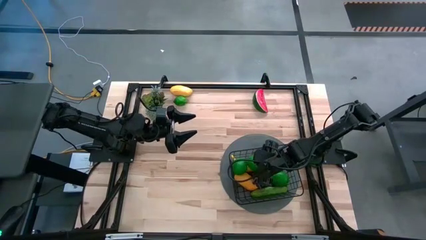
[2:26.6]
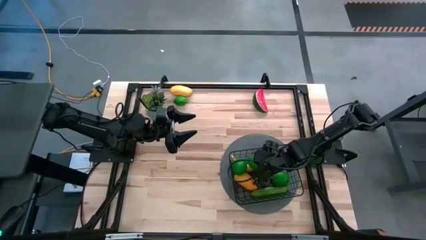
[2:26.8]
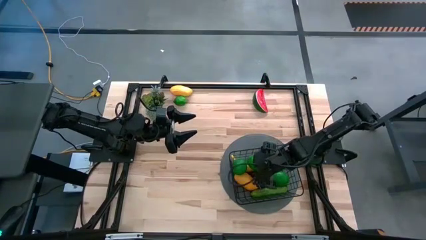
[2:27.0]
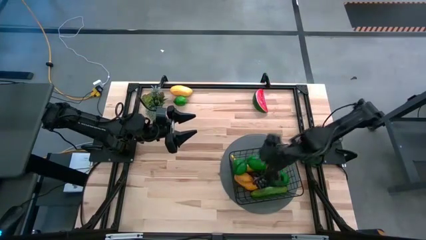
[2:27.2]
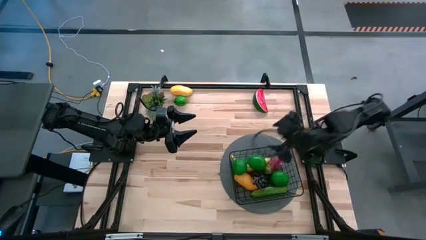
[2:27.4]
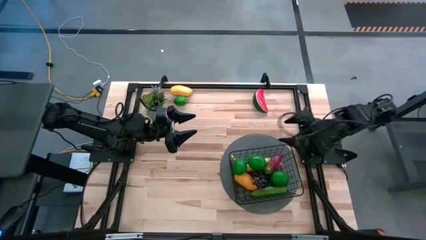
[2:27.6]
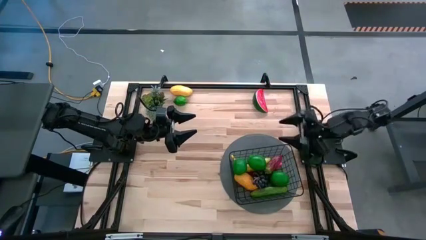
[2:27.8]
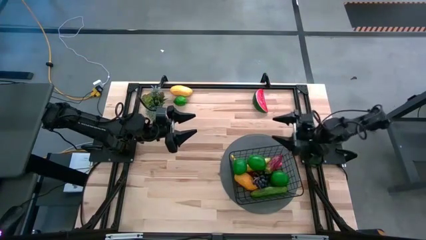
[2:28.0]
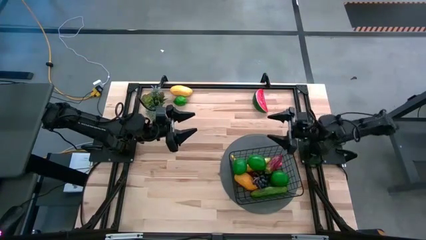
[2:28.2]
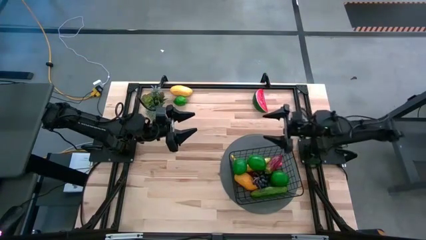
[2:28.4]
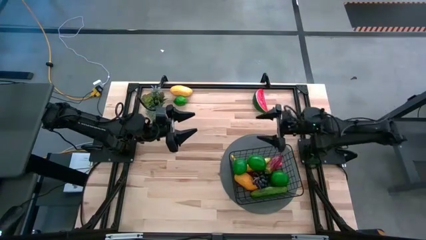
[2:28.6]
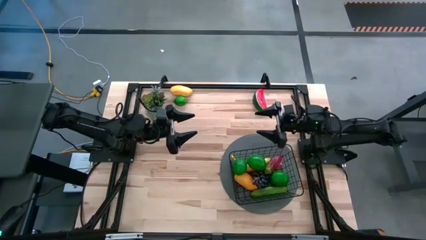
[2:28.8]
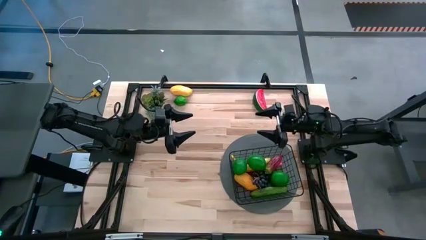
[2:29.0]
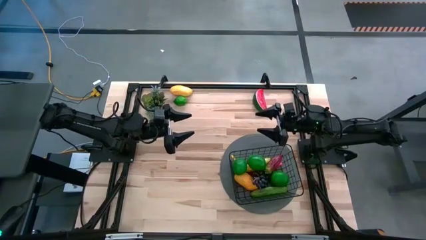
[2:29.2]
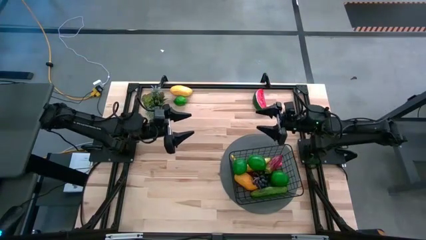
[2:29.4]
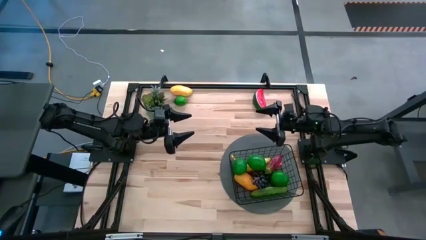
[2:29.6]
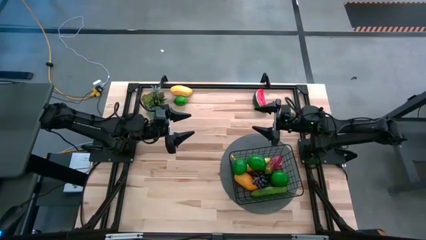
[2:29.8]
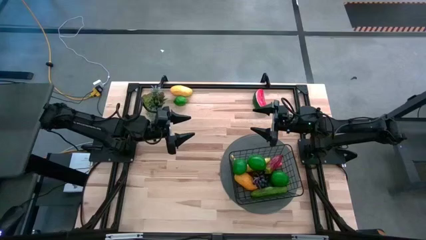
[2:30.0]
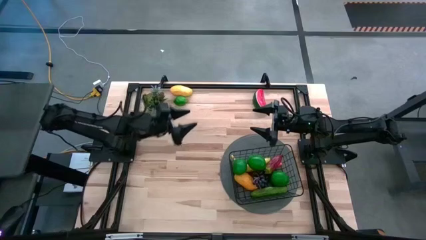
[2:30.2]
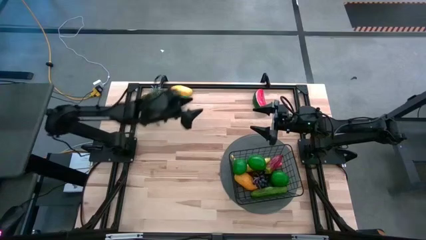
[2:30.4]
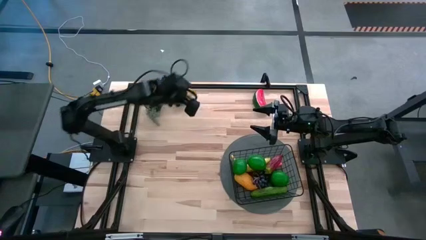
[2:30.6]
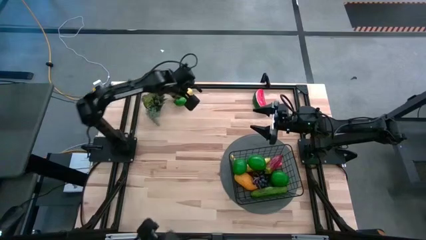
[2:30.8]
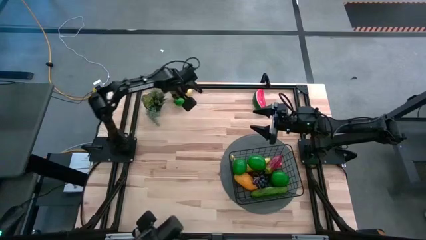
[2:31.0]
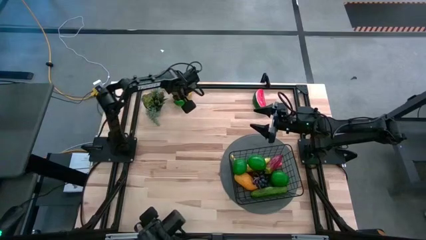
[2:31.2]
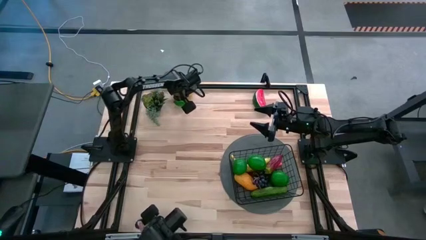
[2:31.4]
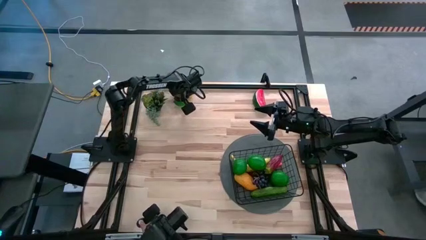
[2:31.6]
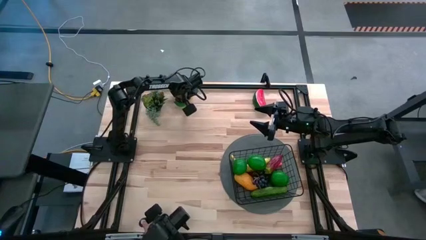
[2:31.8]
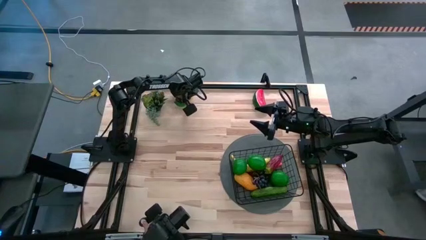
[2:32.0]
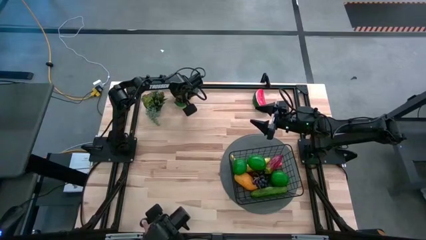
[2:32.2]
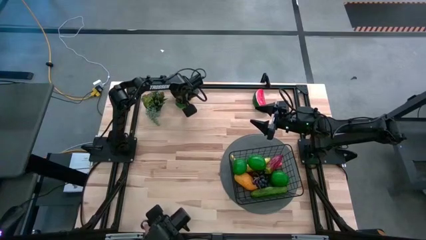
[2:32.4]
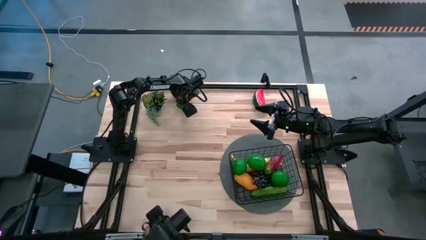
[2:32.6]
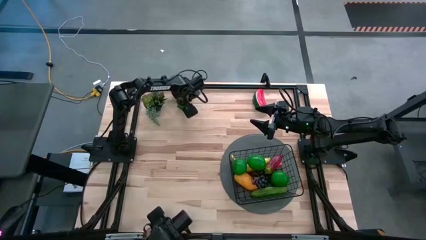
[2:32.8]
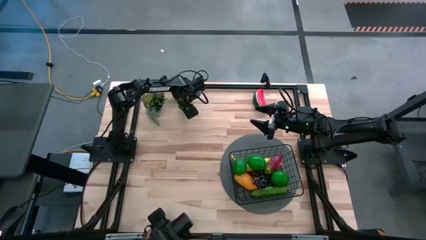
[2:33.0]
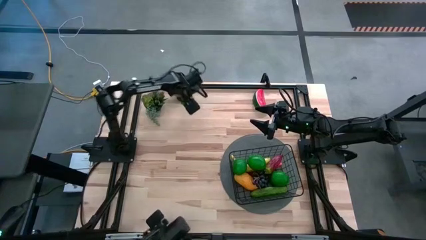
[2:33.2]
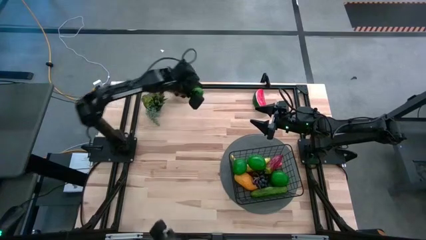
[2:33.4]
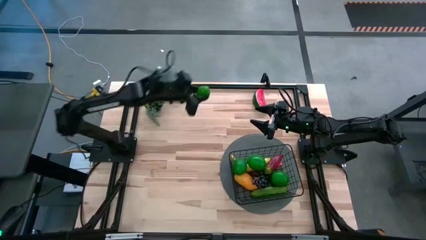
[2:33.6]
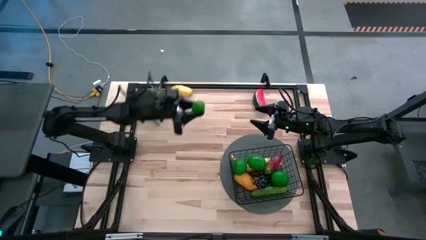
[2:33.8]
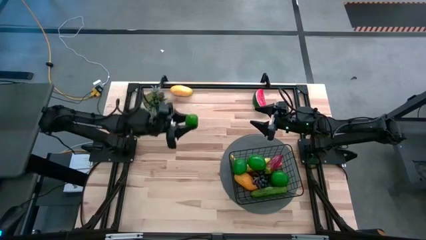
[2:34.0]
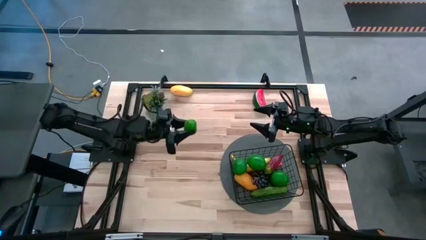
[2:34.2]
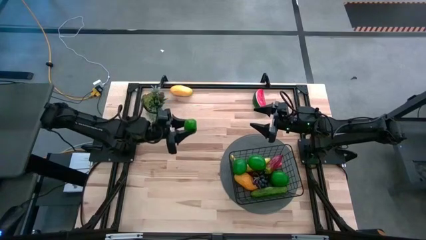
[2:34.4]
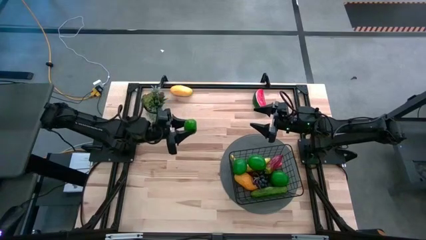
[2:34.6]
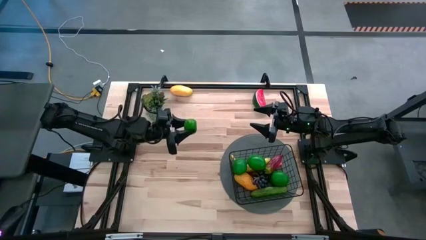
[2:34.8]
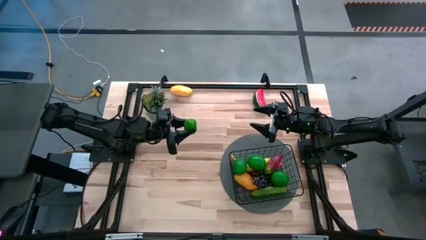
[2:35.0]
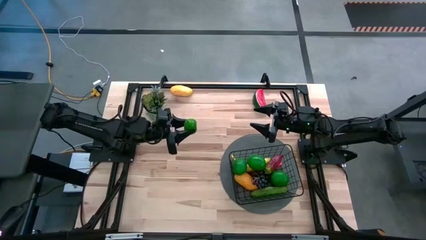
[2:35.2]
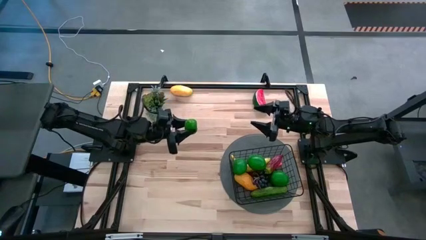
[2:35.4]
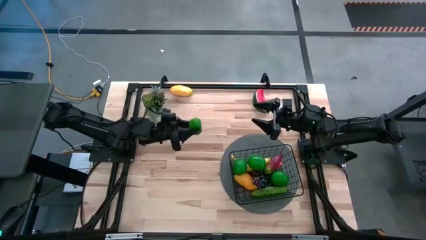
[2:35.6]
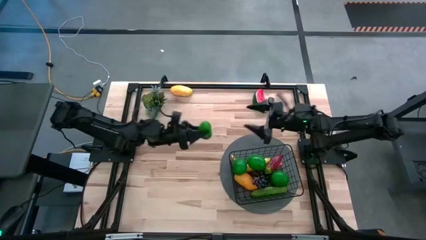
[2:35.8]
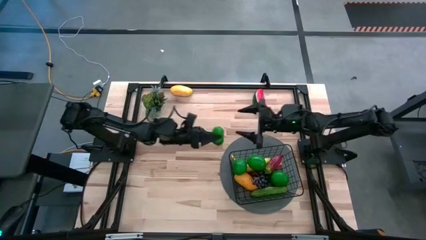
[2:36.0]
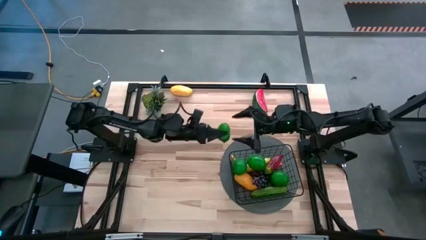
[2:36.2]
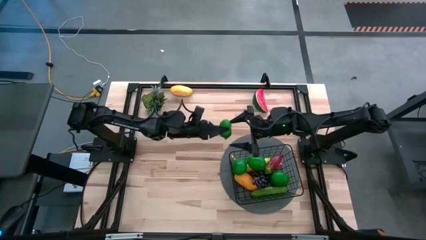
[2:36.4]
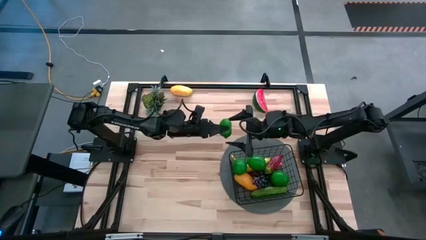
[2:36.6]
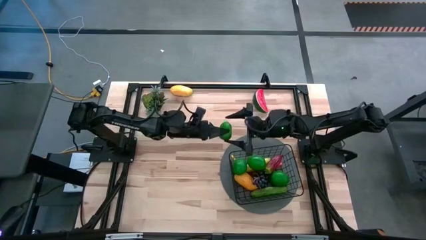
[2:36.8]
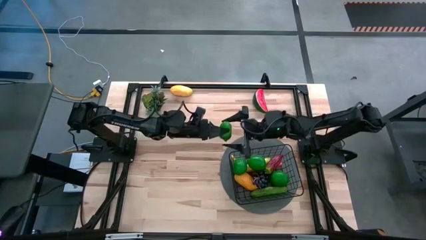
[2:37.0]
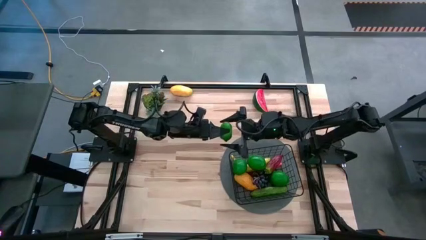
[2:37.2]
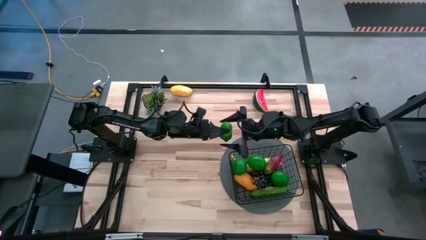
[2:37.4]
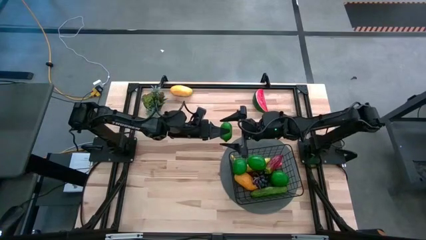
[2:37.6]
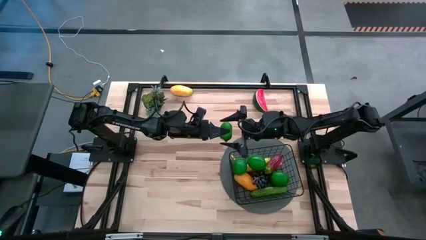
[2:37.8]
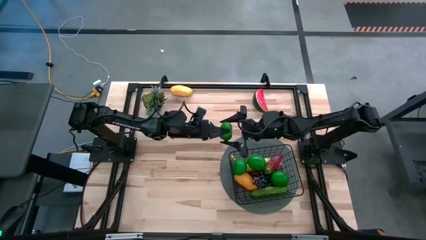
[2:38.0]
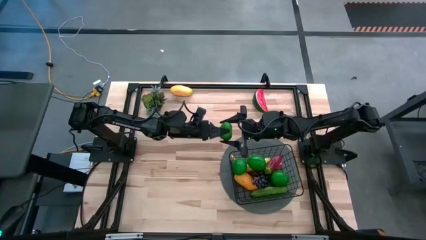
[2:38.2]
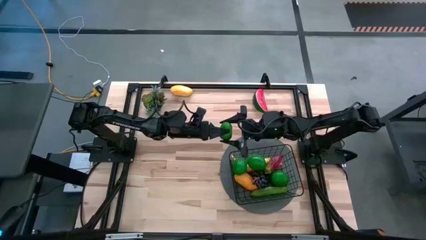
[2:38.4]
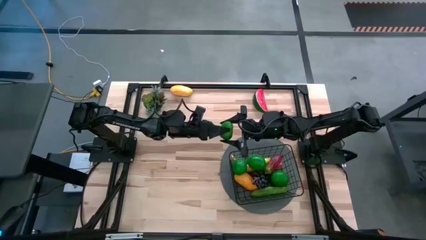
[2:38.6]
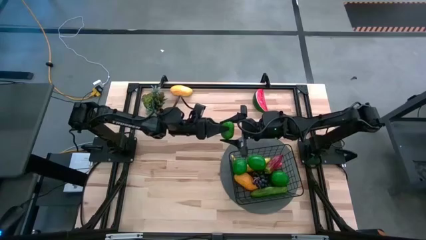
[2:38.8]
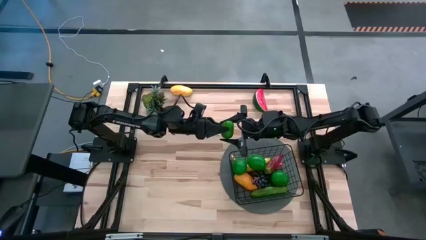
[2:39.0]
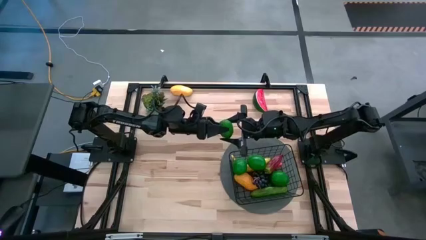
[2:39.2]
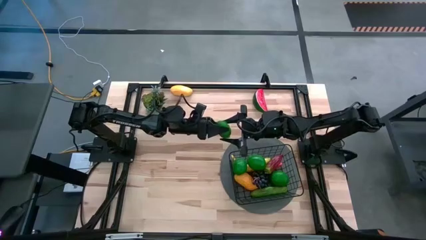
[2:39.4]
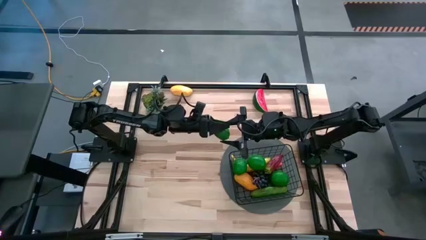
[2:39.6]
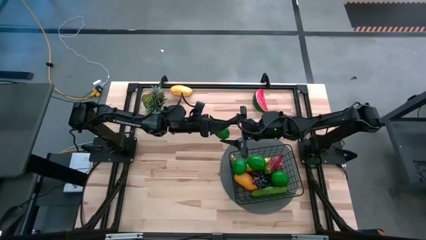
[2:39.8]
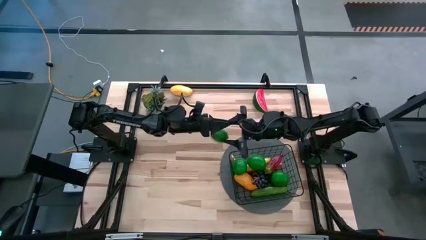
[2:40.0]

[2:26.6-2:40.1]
Task: Build produce basket
Put the green lime into the black basket

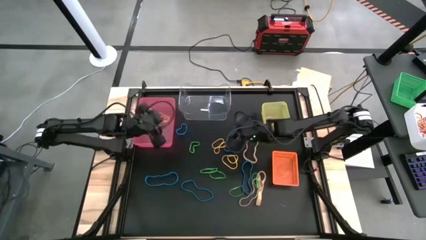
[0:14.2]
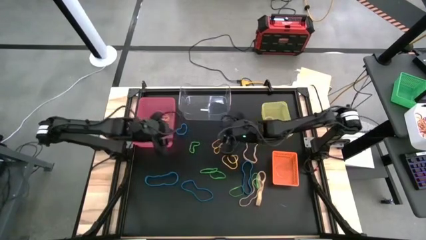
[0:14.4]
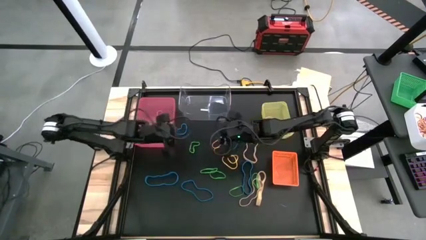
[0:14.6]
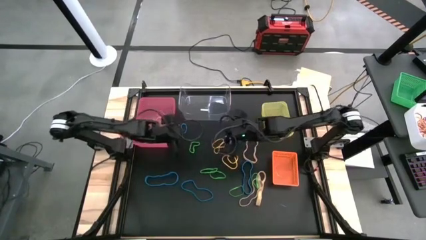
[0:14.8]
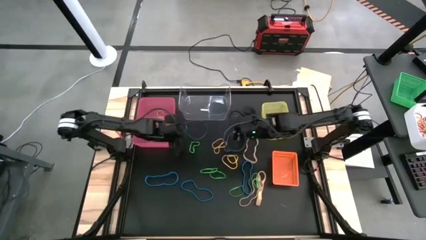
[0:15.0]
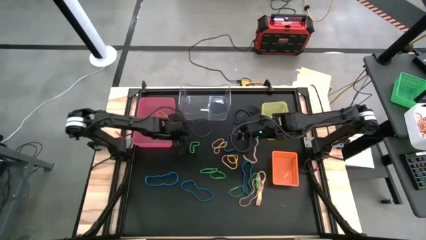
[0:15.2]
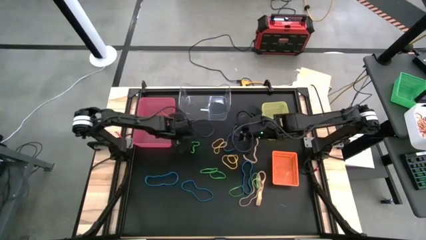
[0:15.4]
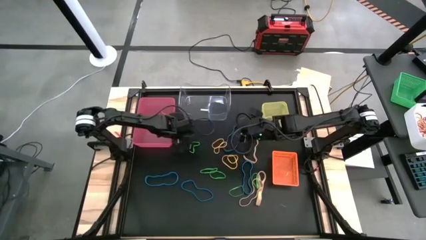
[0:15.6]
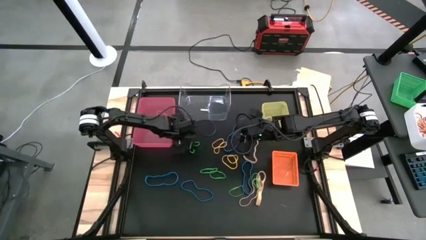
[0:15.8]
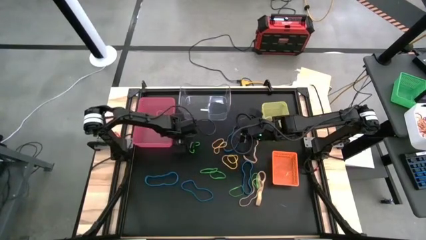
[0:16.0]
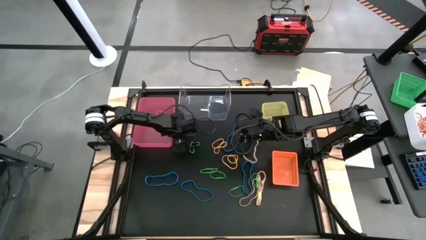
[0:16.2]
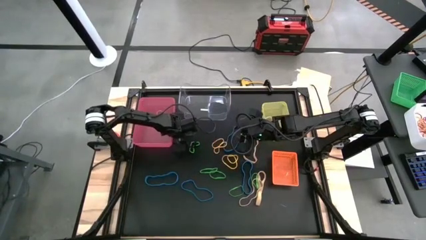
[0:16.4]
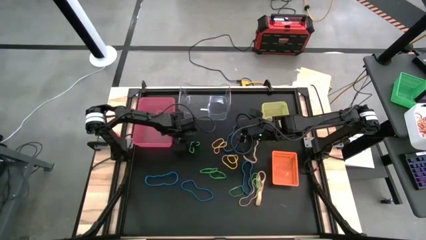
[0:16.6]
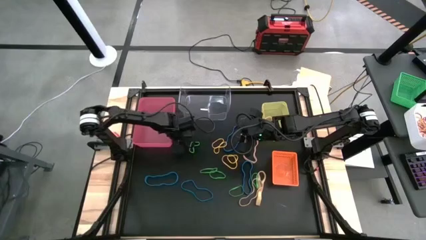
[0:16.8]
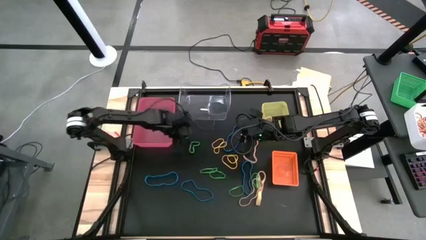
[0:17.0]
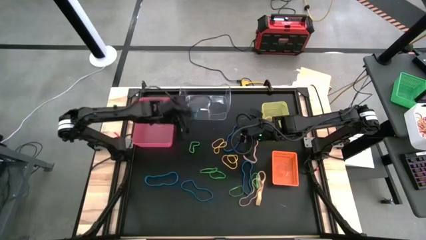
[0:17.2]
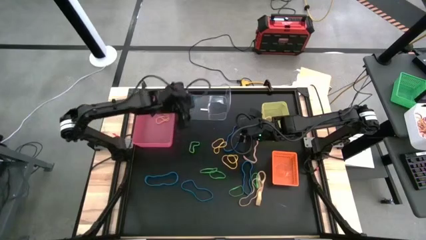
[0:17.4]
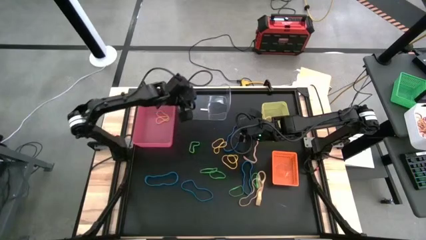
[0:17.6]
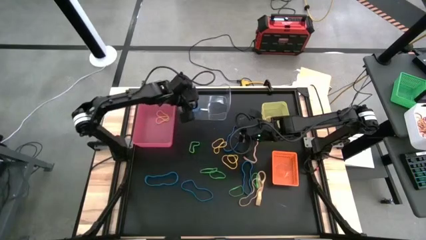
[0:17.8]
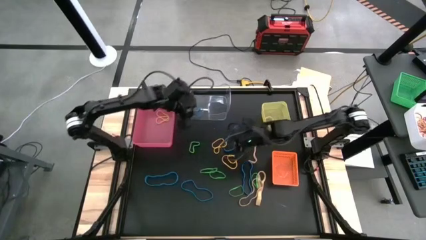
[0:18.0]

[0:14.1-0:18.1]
Task: Sort rubber bands into baskets
Put the blue rubber band into the transparent bin
